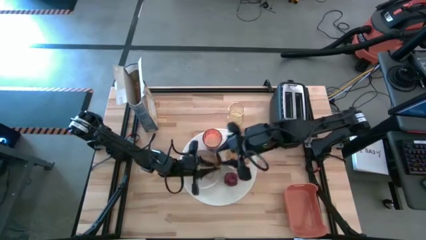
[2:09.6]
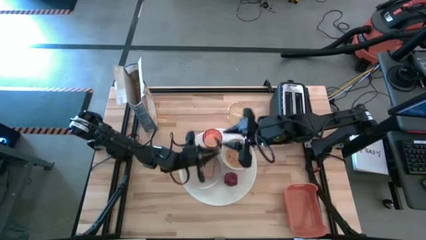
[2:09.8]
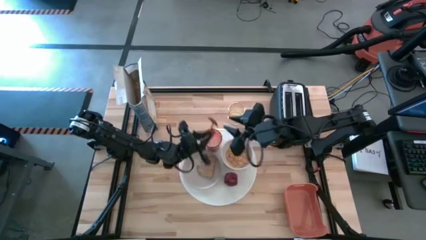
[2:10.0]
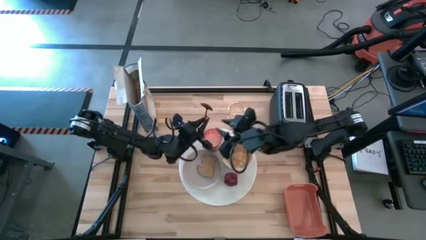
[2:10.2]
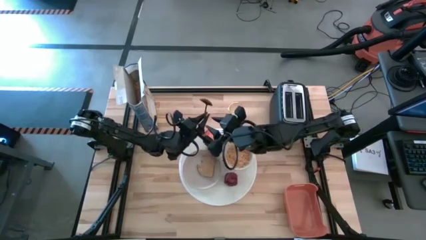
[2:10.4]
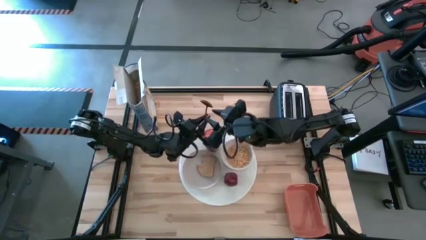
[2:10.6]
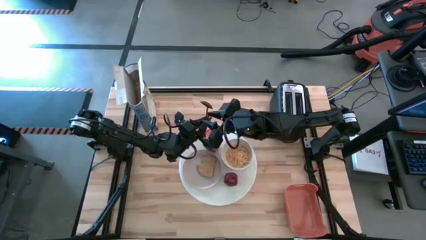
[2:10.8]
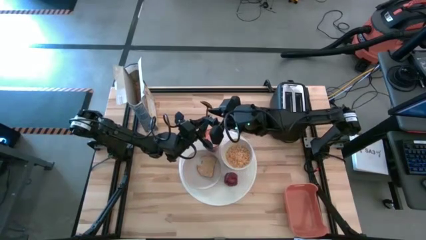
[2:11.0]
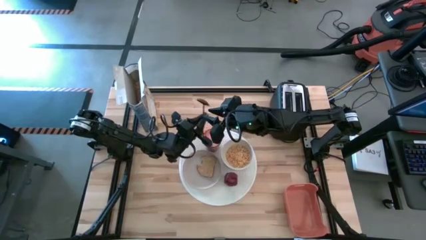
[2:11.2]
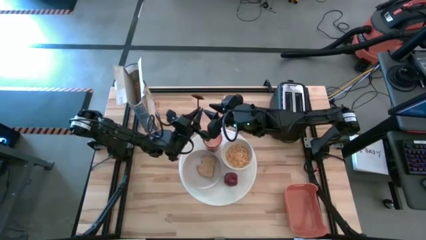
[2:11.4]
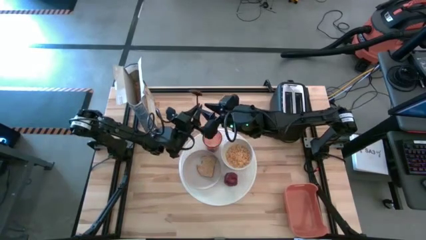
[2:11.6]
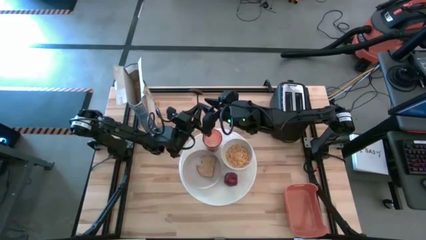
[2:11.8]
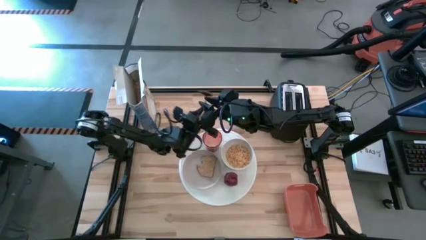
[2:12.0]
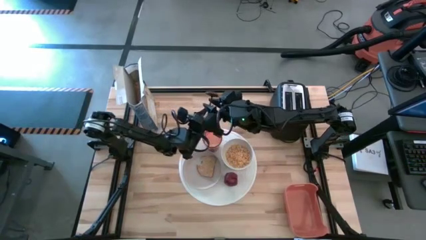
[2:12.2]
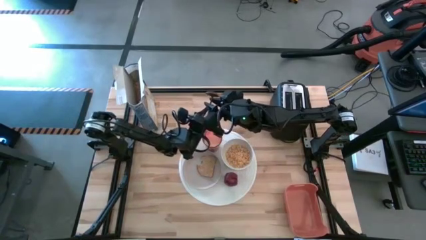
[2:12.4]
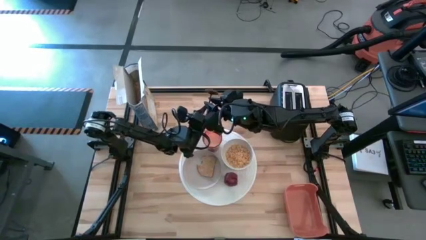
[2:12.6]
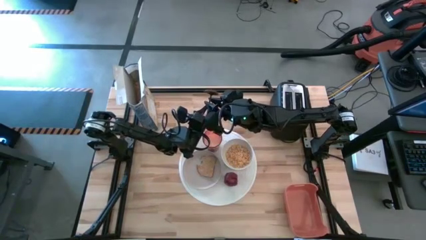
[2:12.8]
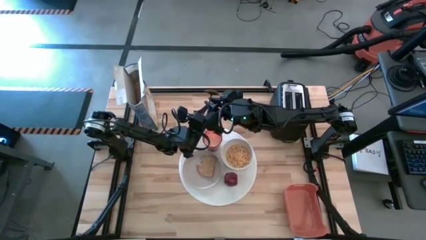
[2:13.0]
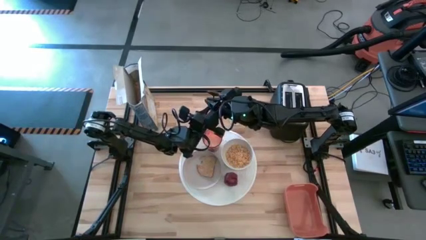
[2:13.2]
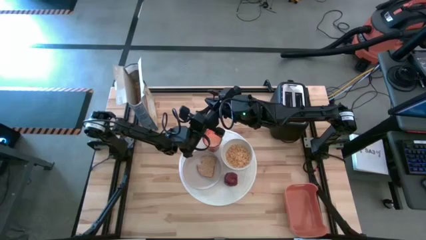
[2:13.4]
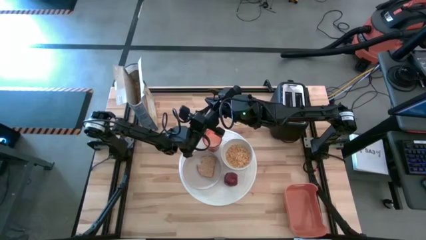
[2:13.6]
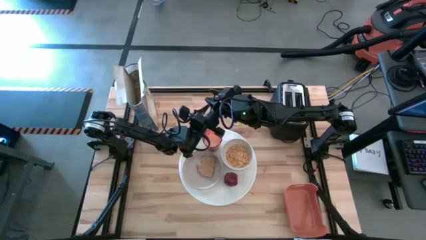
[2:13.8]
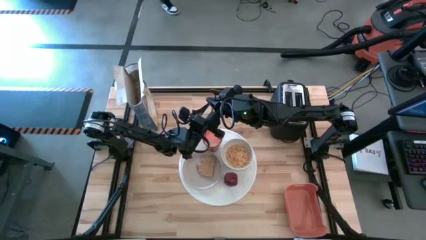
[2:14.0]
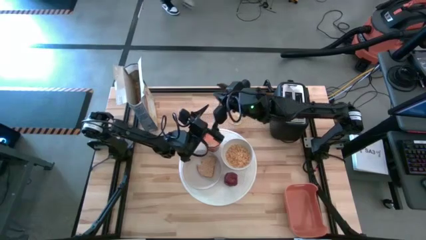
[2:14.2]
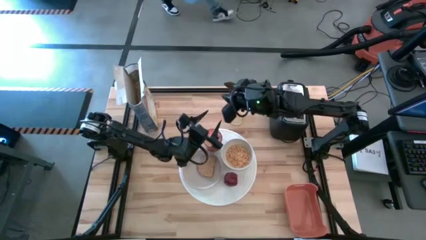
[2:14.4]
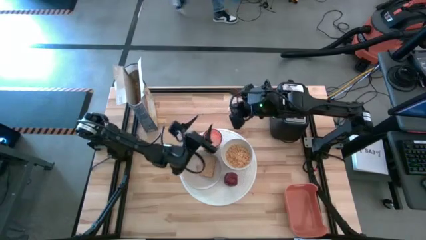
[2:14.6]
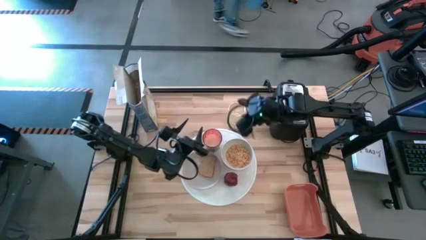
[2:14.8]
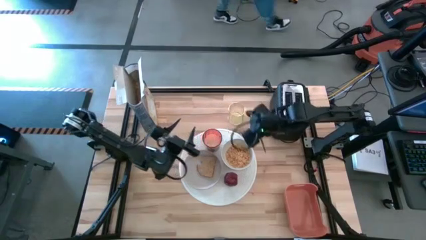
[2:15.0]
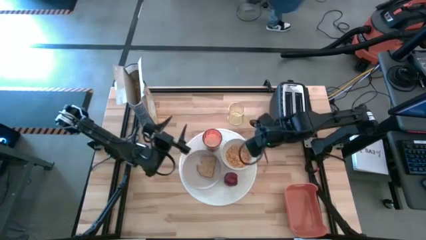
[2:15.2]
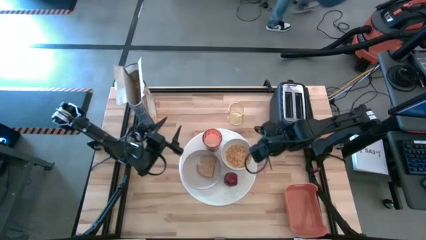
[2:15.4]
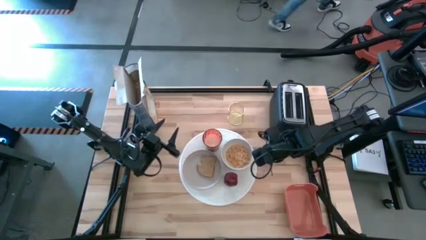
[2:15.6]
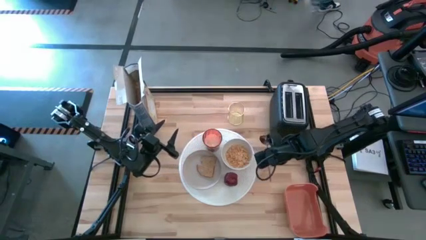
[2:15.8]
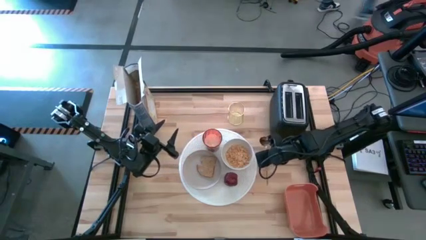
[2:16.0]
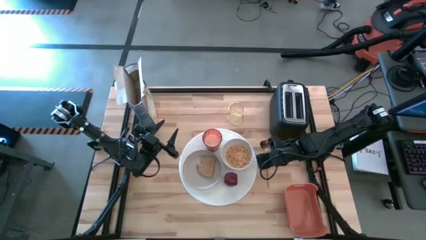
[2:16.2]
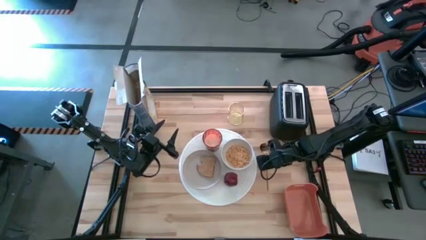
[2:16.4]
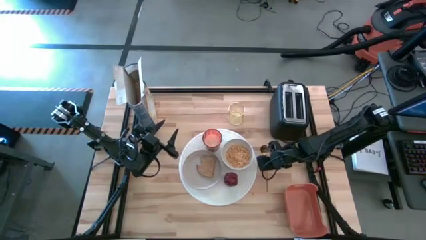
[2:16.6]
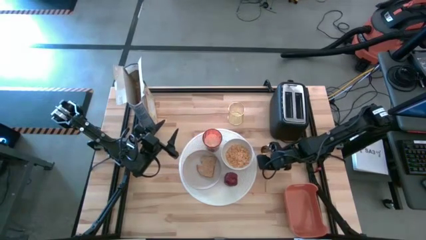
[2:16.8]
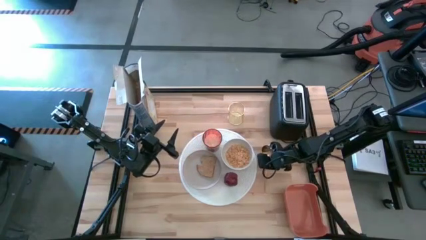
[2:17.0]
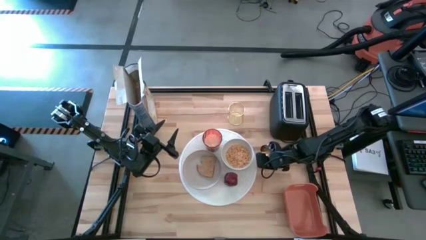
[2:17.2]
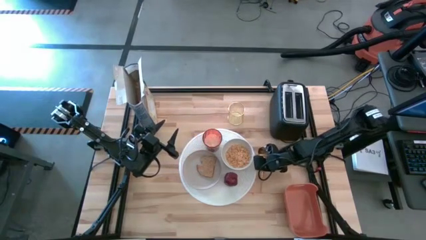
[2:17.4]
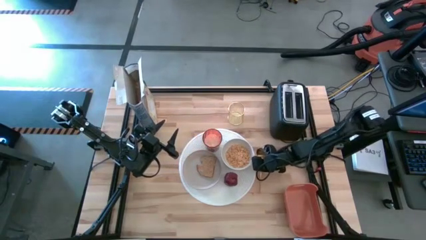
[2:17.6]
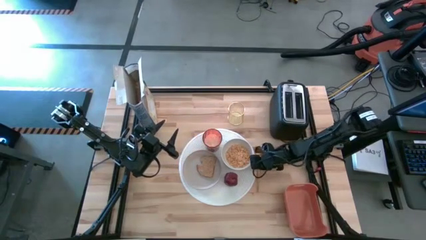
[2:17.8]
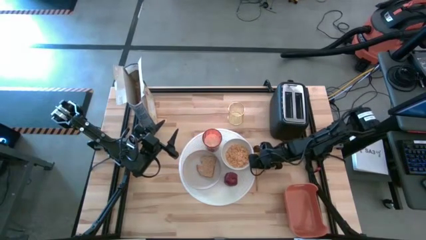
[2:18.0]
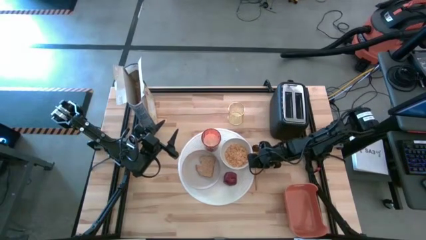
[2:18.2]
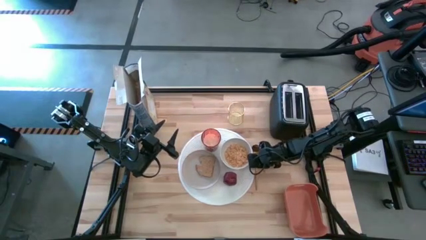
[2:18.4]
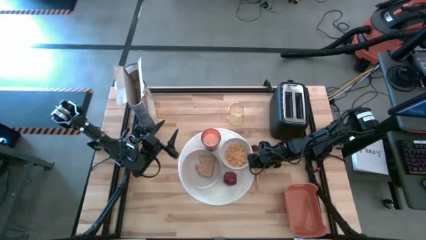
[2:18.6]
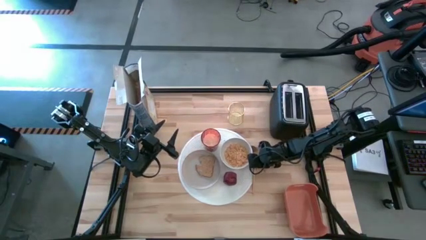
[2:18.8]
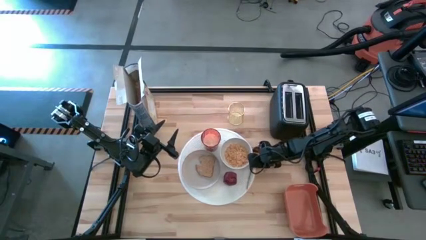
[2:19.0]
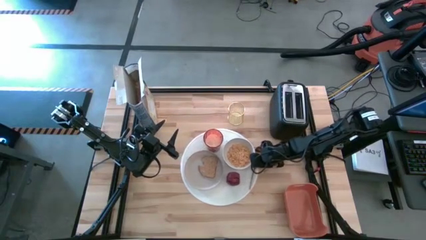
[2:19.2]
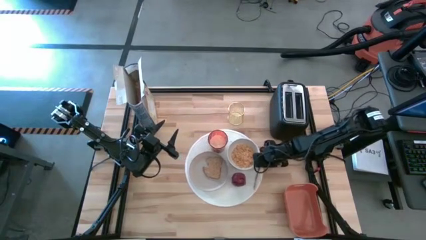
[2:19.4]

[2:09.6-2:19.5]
Task: Arrange a breakfast setting
Put the gold spoon on the white placemat to the right side of the white bowl

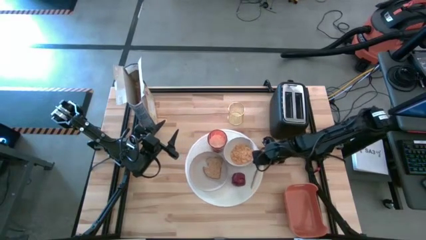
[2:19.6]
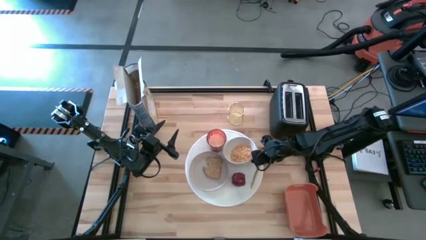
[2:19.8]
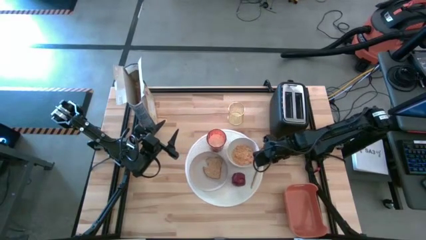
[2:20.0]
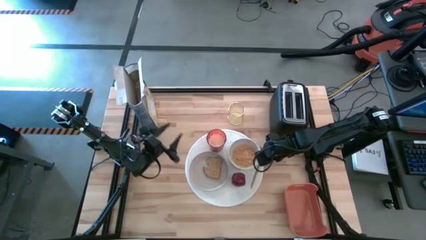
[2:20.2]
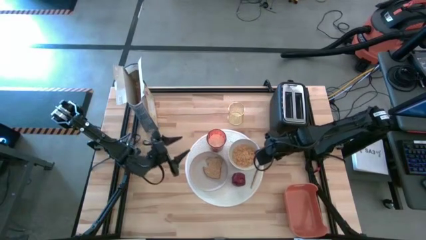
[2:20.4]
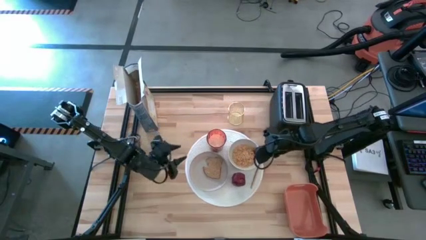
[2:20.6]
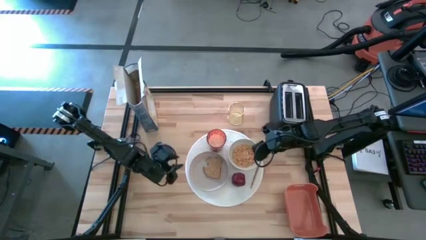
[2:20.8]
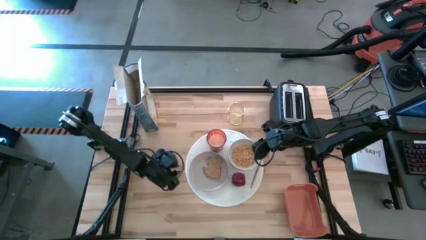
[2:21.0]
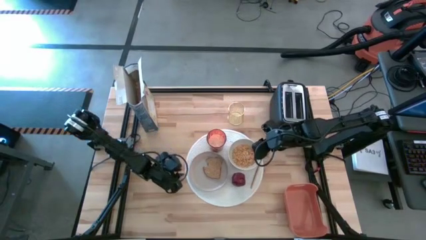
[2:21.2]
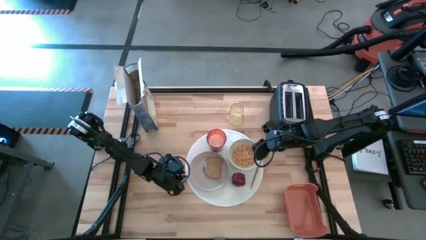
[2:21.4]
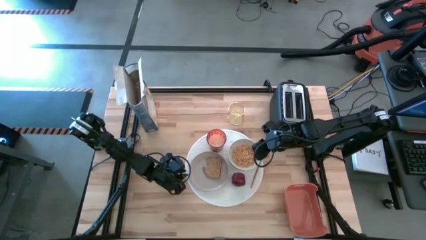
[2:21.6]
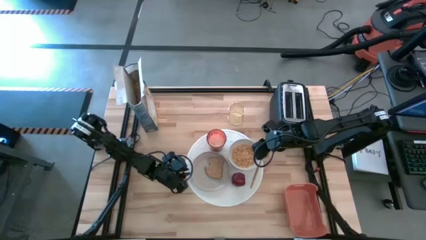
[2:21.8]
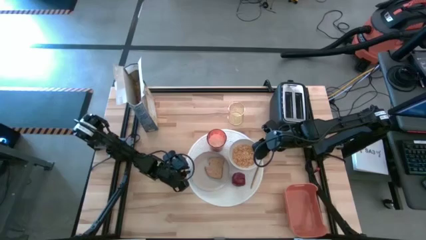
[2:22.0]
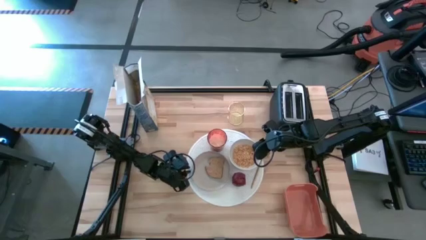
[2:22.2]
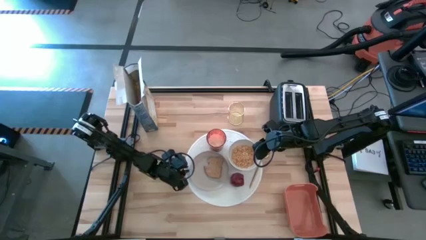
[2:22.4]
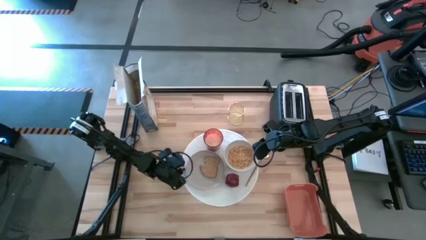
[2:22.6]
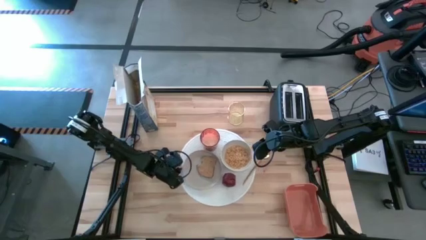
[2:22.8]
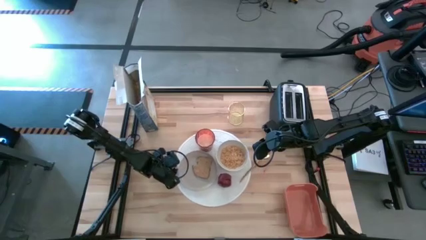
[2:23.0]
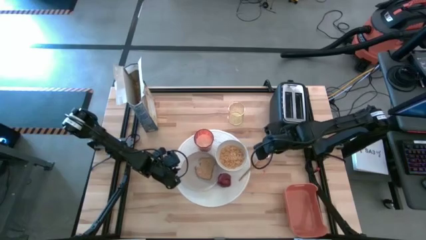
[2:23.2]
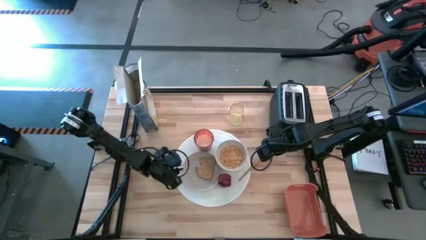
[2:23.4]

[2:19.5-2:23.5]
Adjust the white placemat

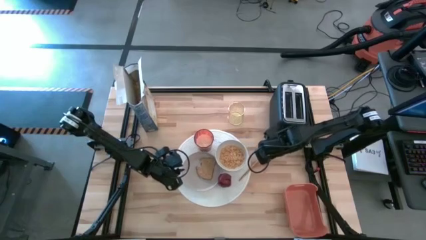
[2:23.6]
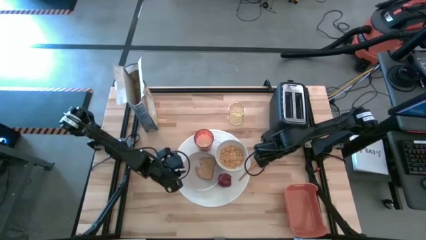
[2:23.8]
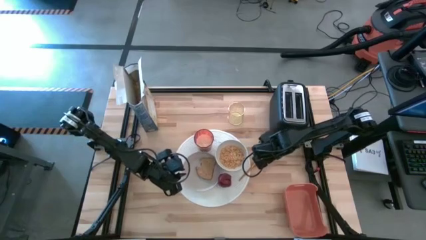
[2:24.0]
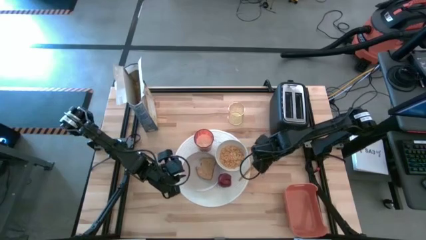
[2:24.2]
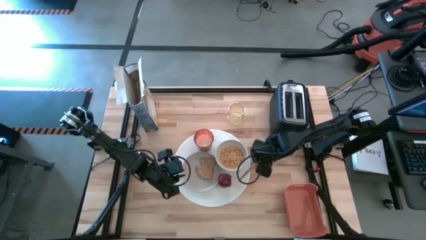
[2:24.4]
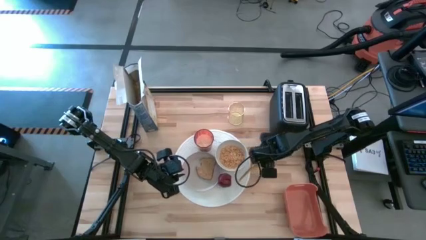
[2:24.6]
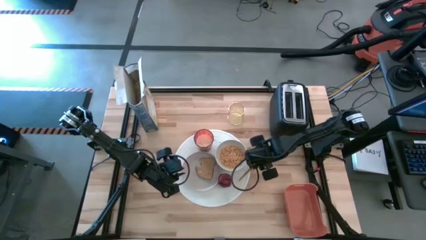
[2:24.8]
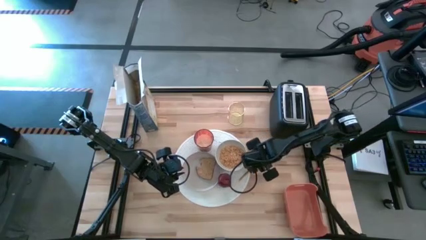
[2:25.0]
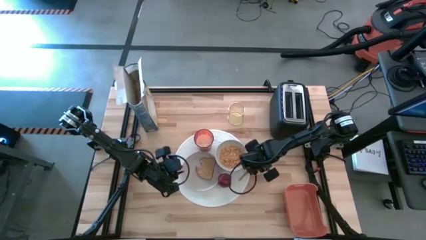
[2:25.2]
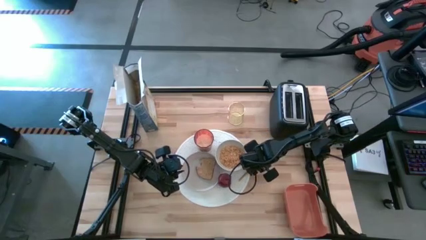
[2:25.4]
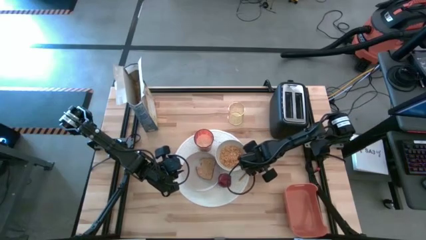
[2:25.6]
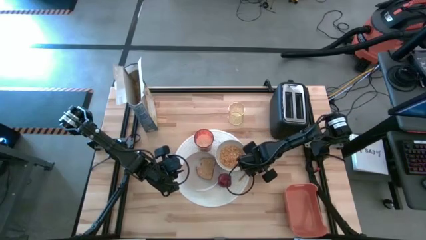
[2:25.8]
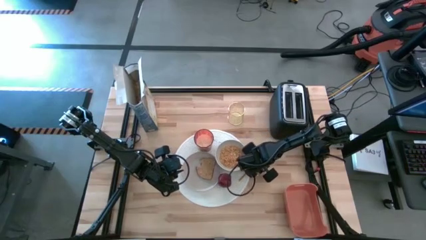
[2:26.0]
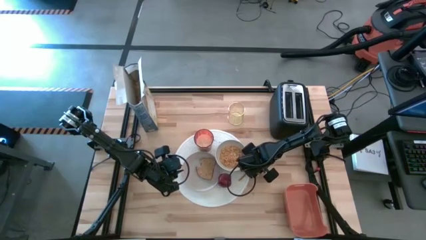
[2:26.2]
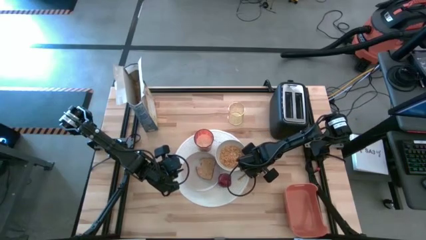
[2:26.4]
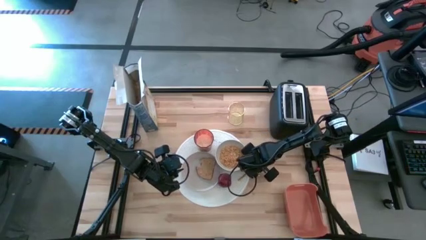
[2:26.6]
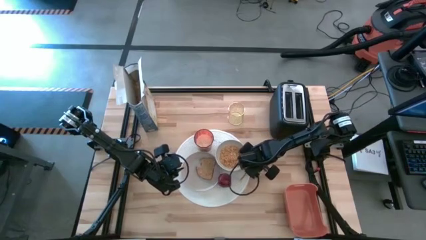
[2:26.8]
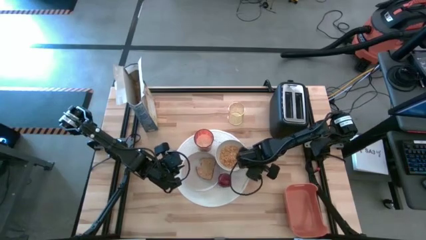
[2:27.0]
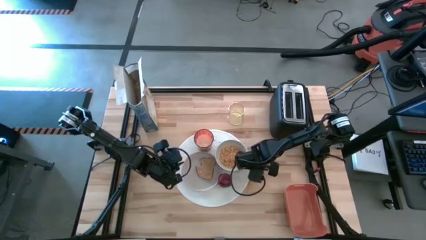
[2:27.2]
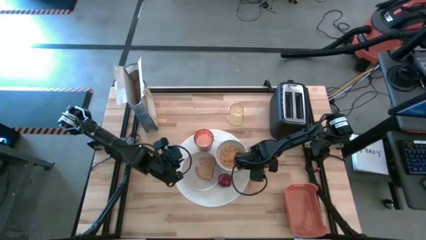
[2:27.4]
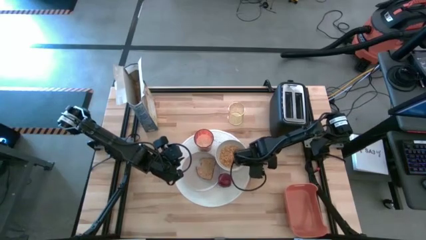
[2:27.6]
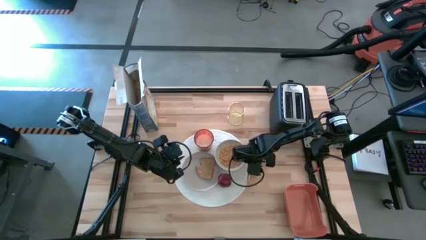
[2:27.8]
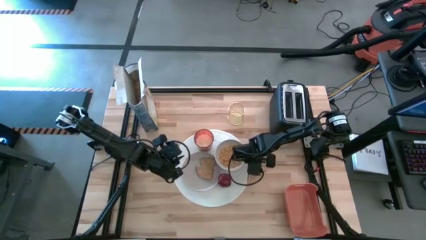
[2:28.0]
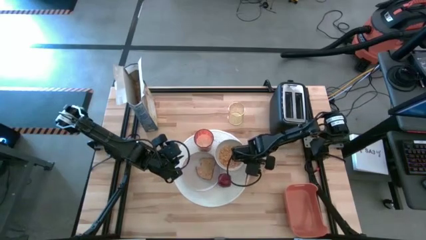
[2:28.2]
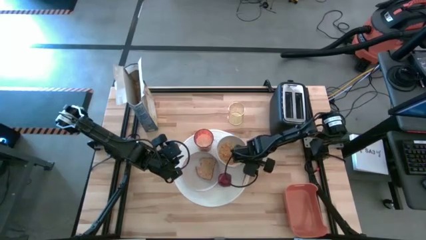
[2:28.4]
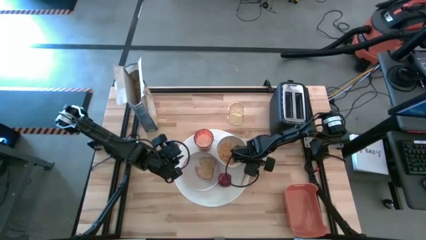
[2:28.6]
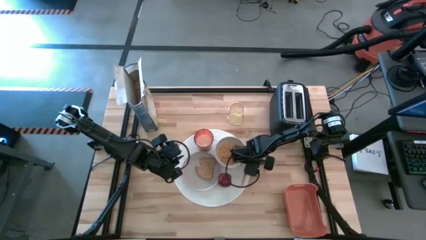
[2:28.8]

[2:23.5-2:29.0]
Adjust the gold spoon on the white placemat
